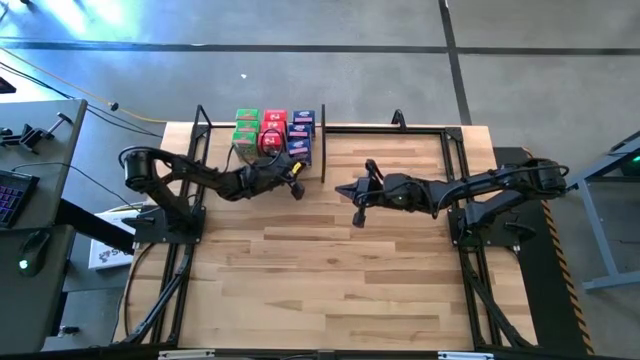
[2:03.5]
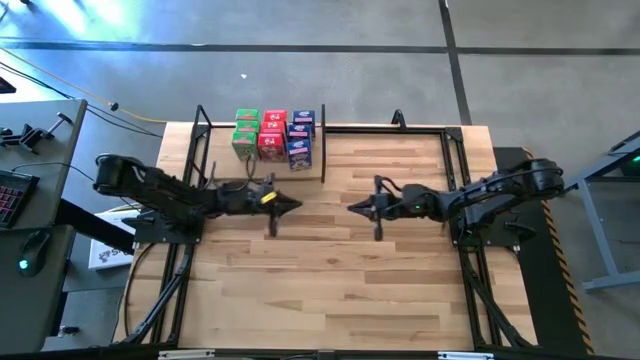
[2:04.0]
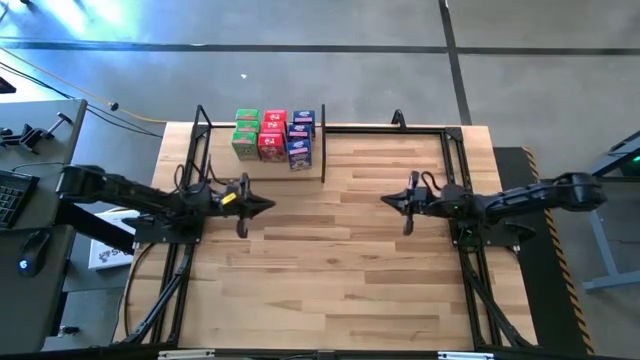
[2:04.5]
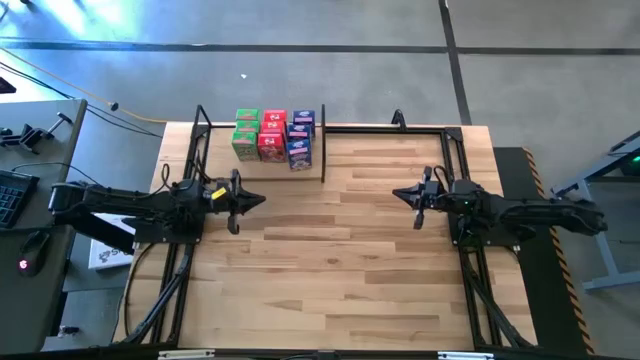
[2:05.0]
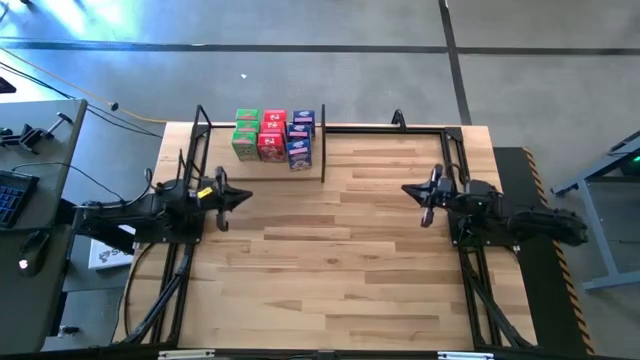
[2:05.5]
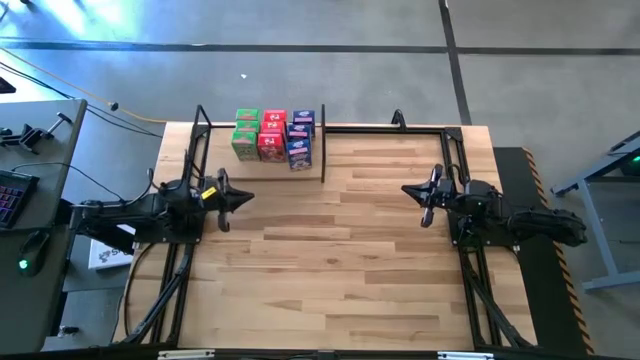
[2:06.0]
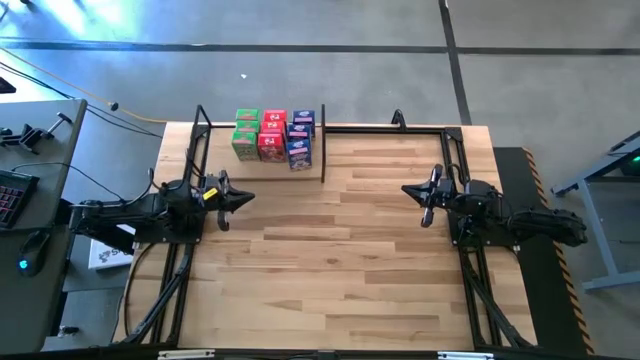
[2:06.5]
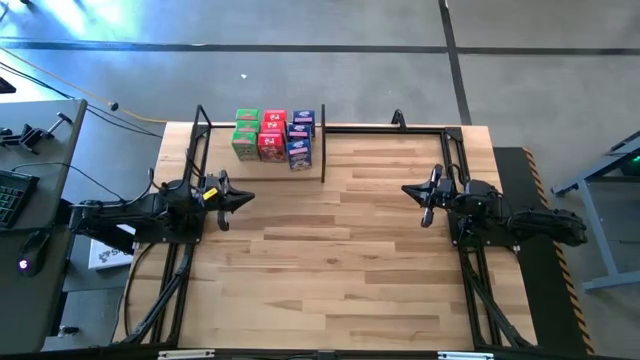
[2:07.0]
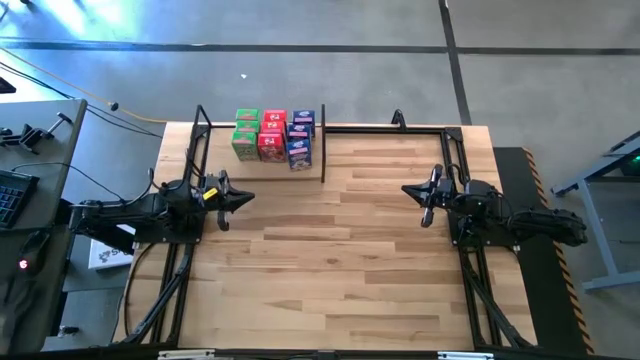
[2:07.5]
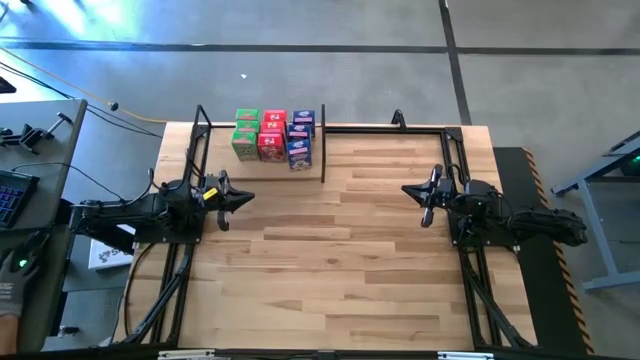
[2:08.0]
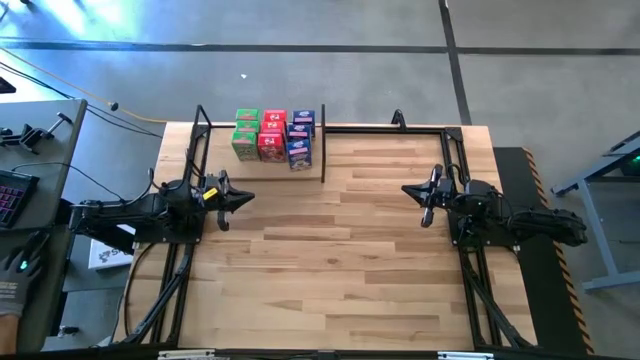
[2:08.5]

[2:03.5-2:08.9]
Task: Stack cereal on shelf
Return to Home Position

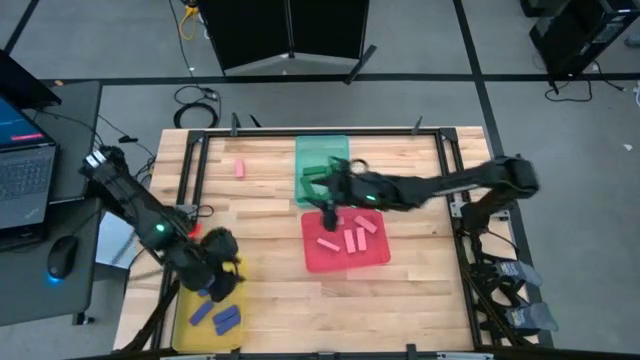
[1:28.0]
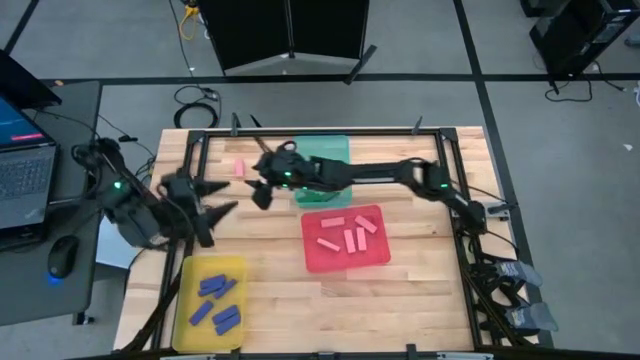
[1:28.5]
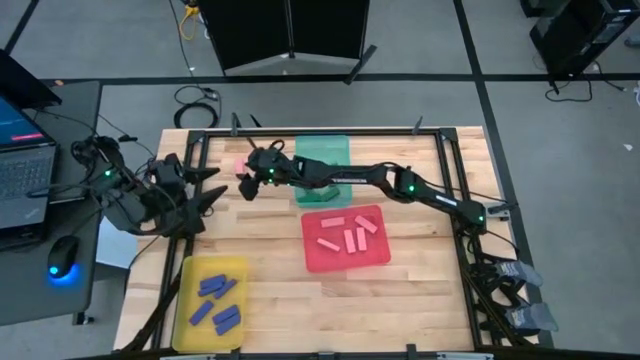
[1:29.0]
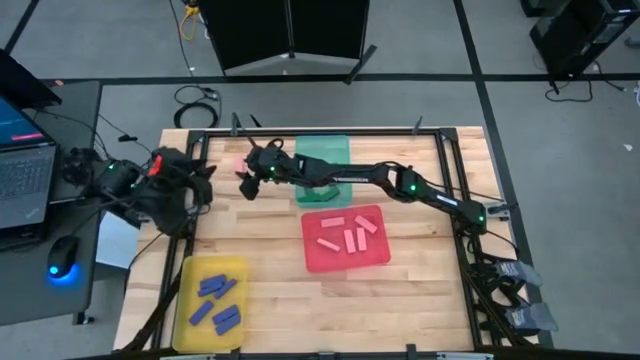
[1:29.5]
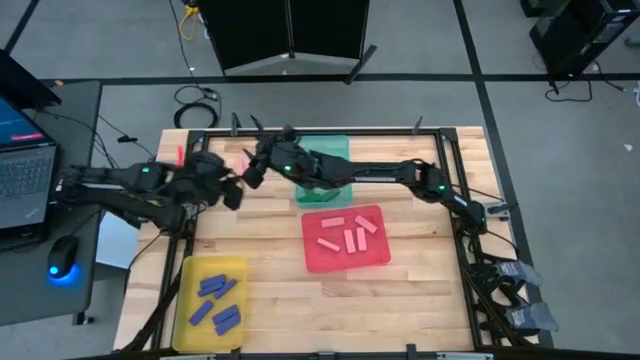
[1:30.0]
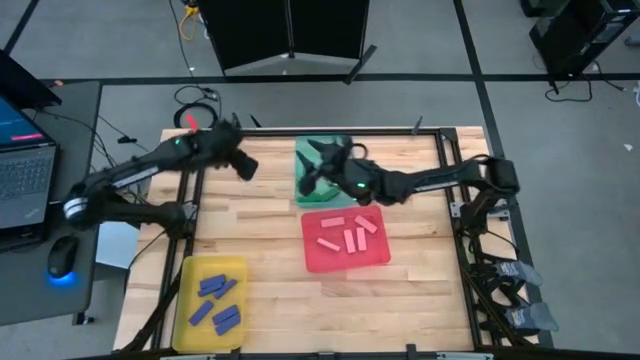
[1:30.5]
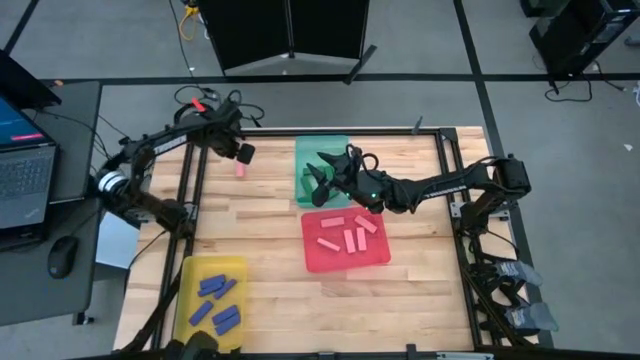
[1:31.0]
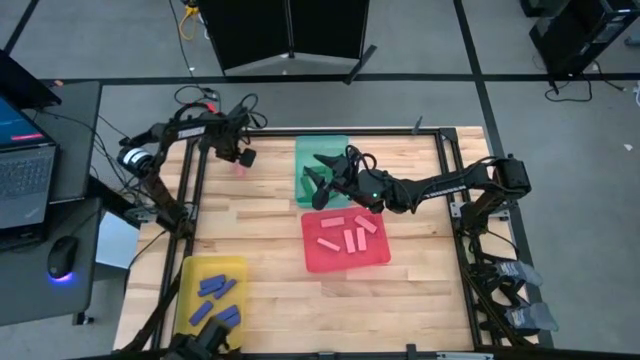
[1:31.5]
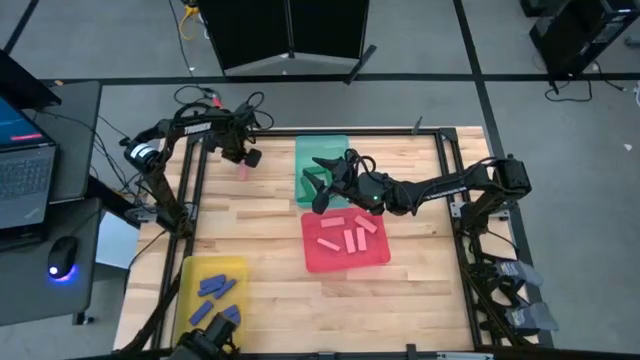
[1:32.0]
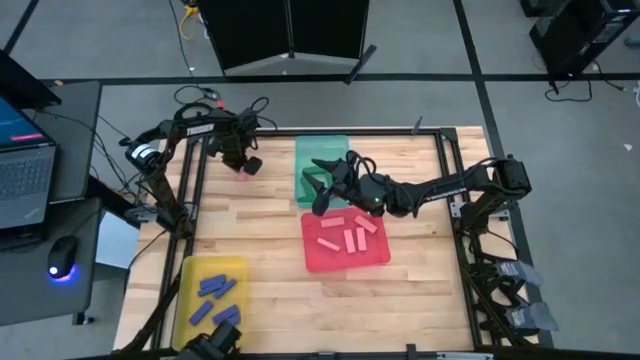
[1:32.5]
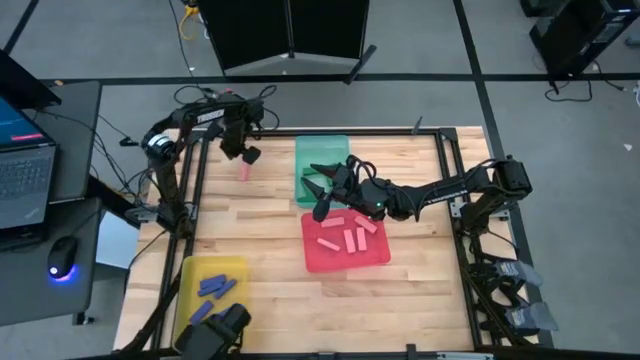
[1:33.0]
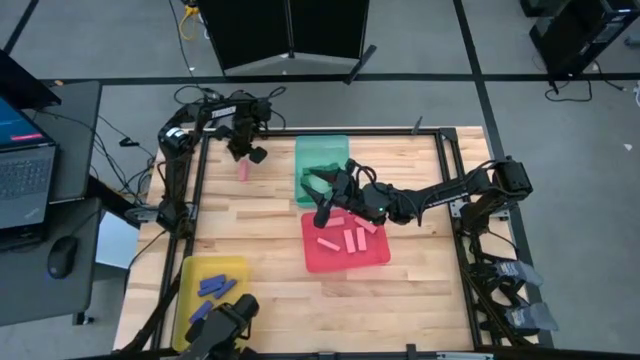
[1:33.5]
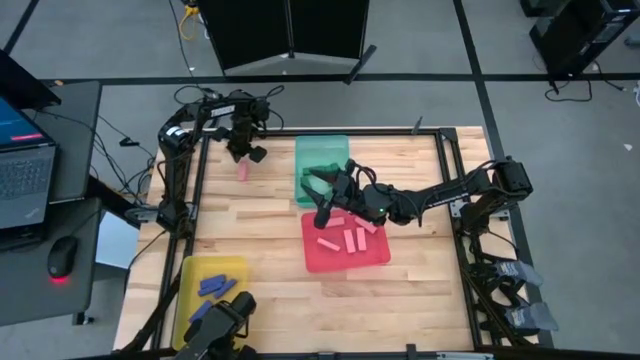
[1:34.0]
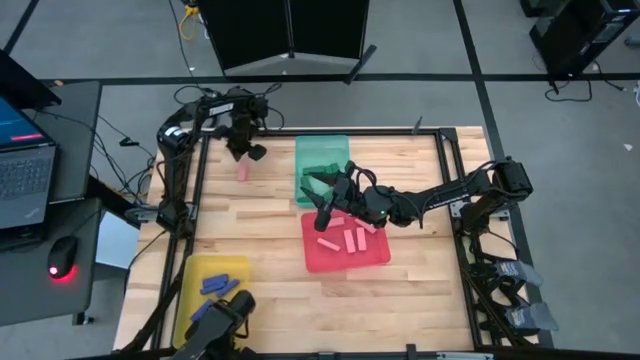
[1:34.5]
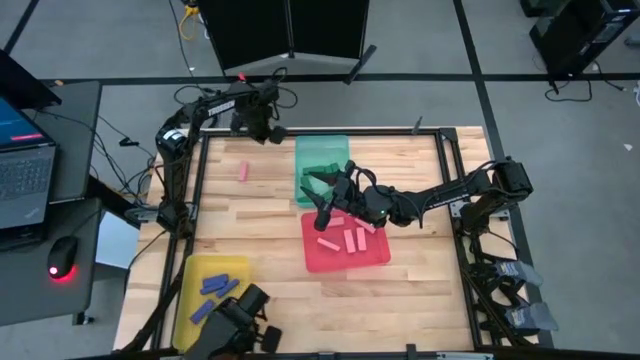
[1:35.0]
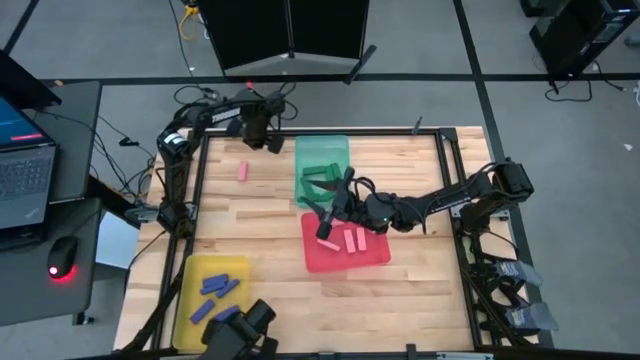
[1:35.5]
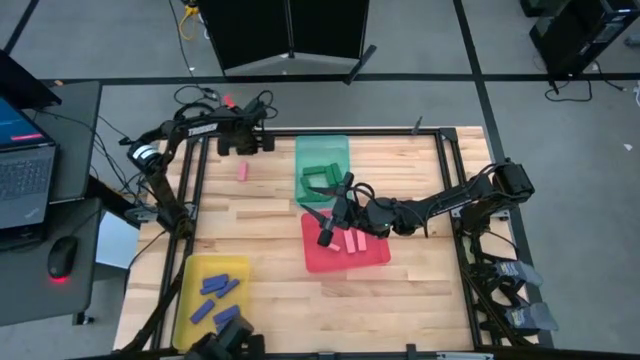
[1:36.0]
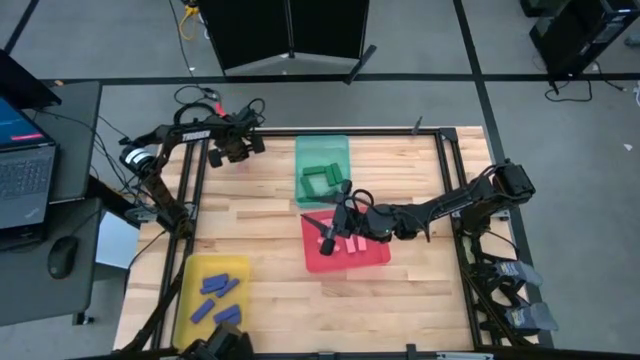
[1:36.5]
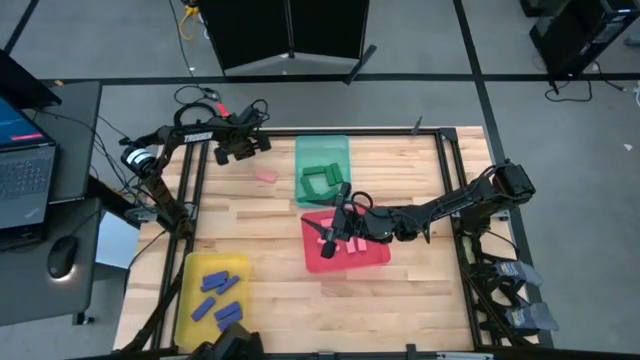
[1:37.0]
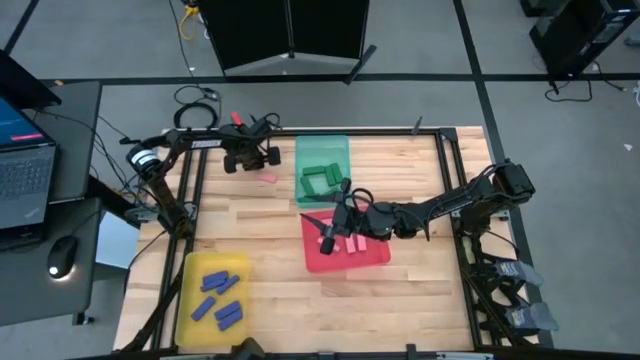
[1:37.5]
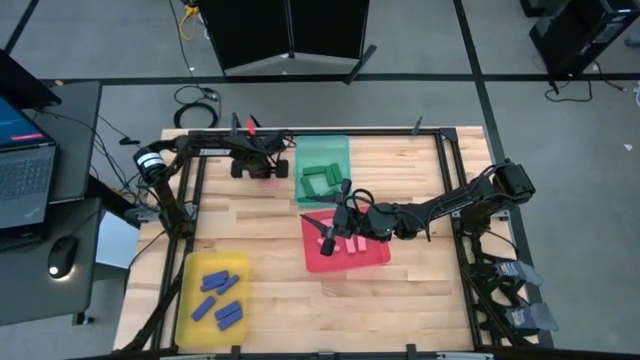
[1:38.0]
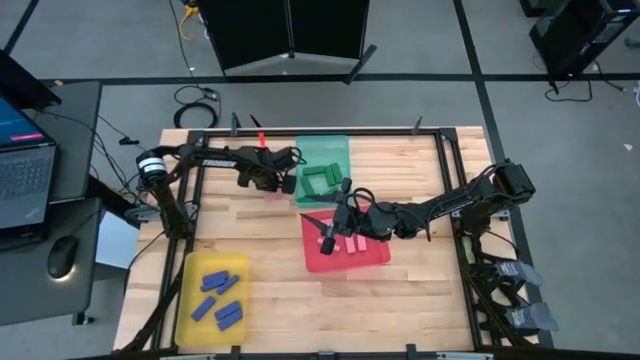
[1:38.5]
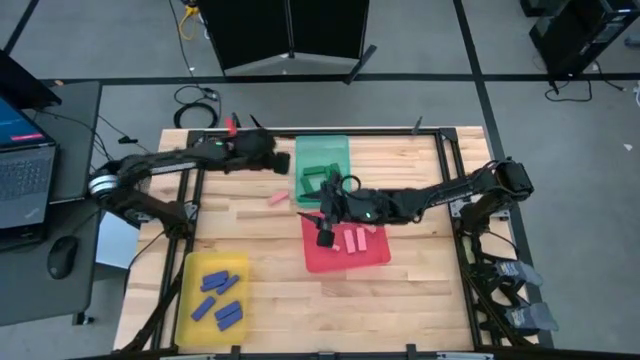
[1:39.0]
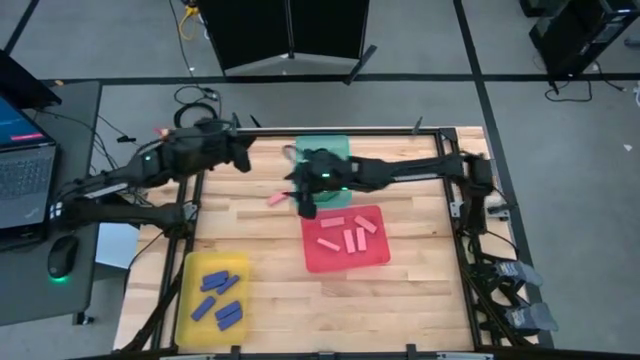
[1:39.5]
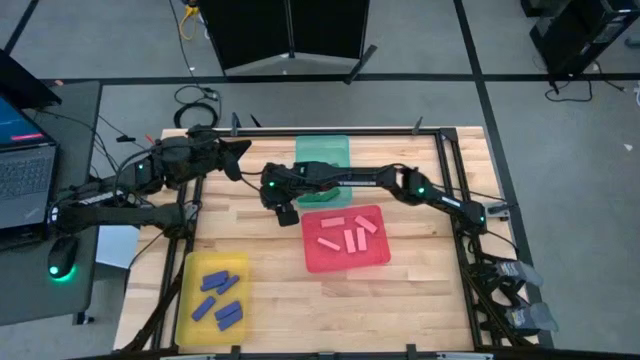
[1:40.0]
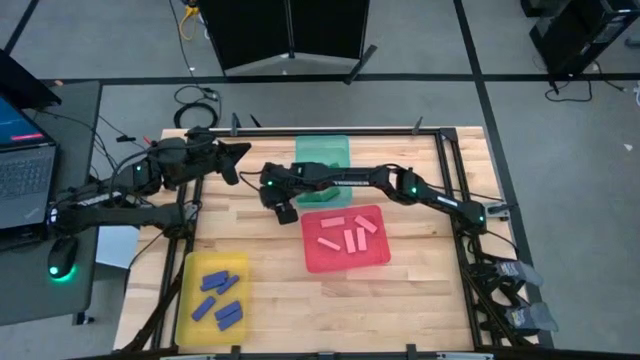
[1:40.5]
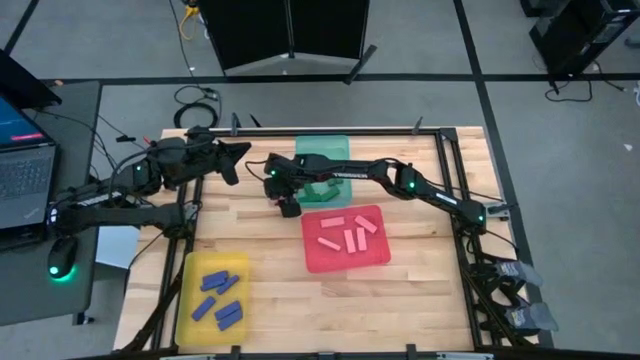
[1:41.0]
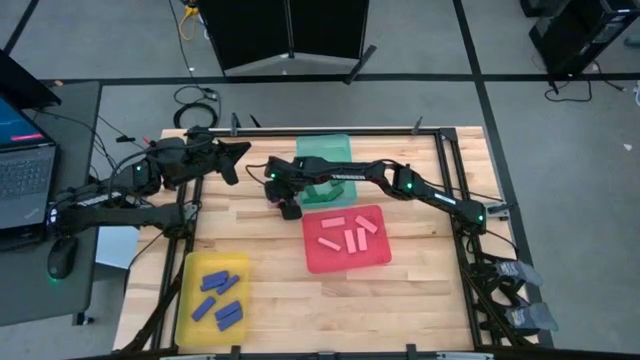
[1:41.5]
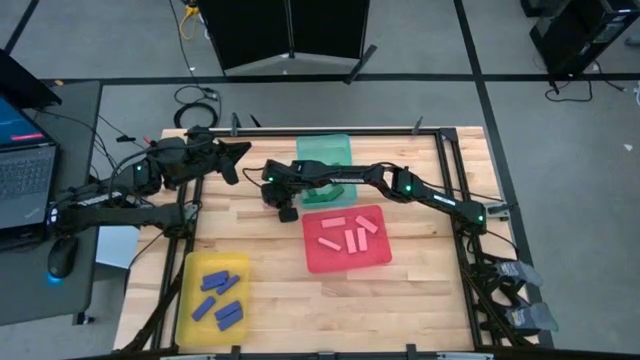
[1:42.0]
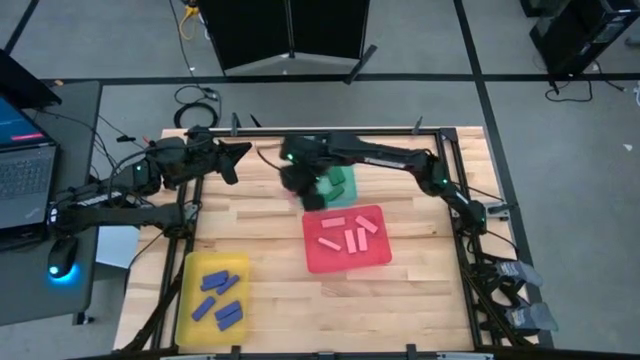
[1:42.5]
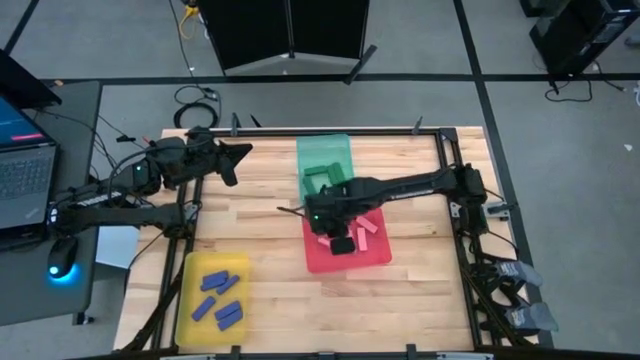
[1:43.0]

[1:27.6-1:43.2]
Task: Sort blocks
Put the pink block into the pink bin
